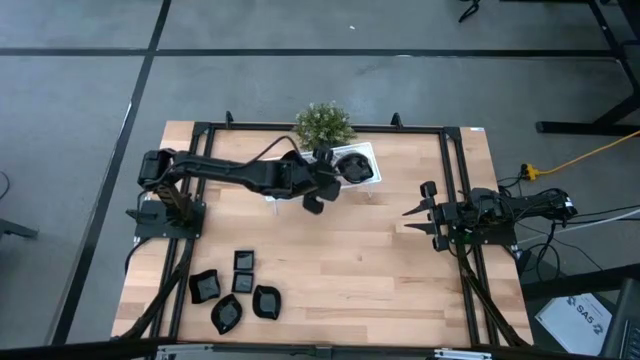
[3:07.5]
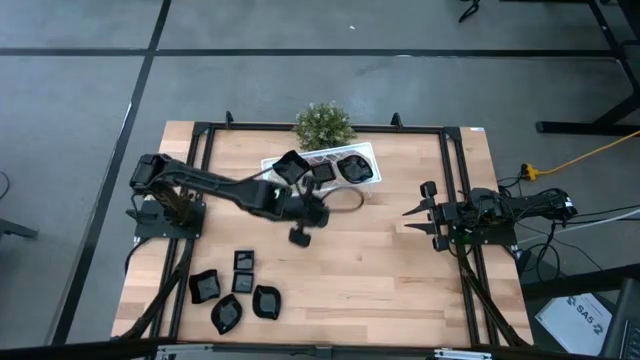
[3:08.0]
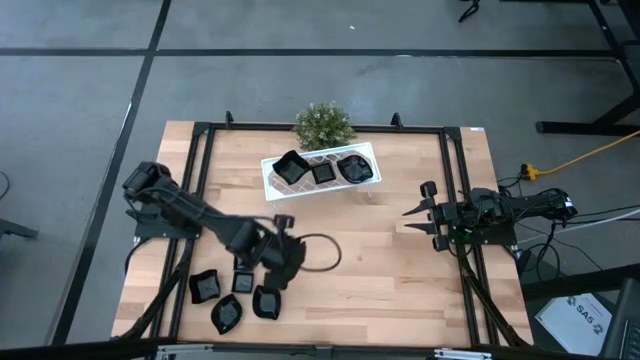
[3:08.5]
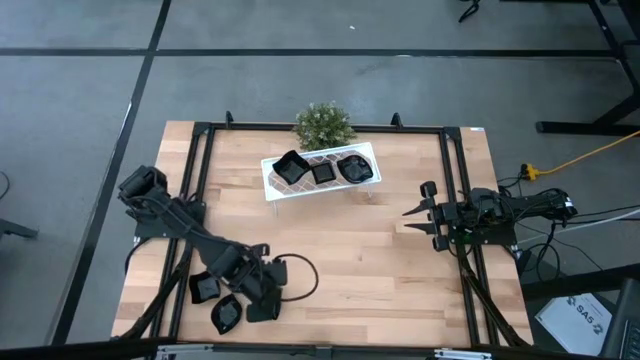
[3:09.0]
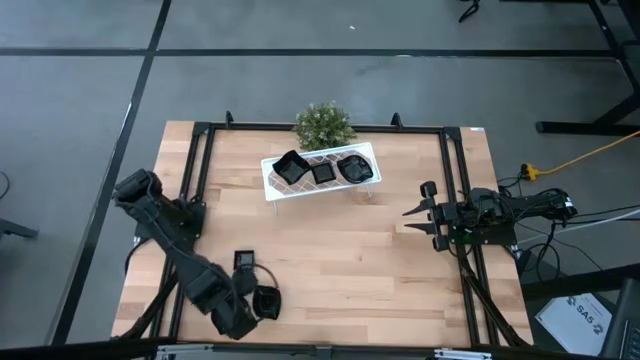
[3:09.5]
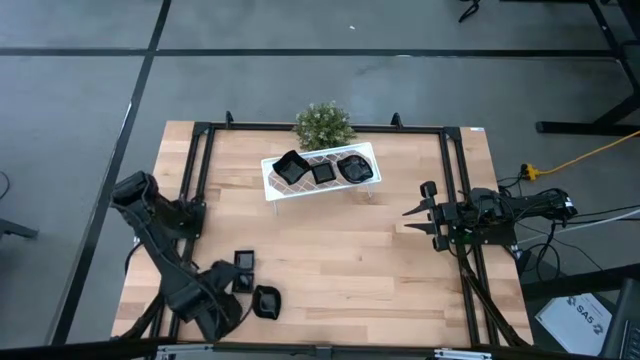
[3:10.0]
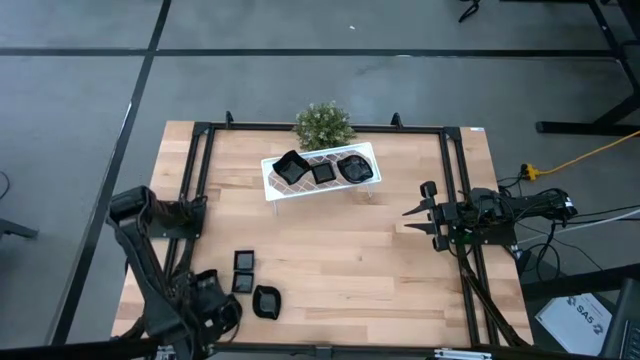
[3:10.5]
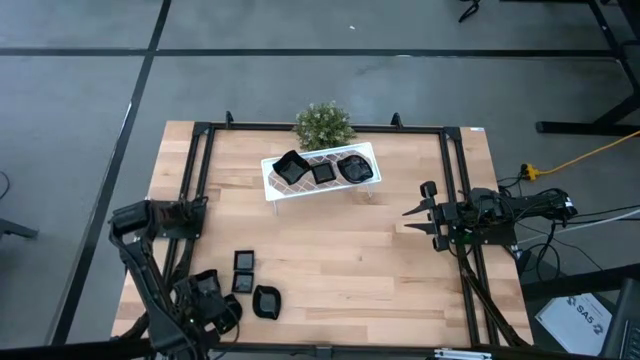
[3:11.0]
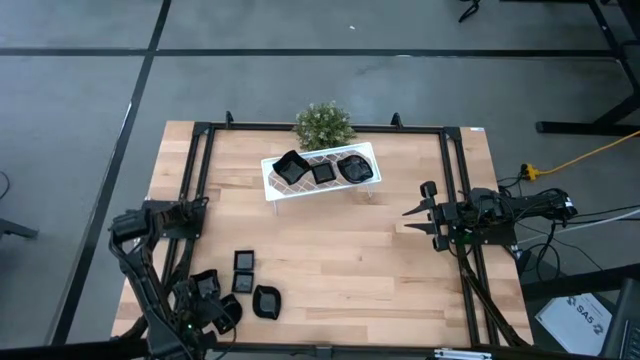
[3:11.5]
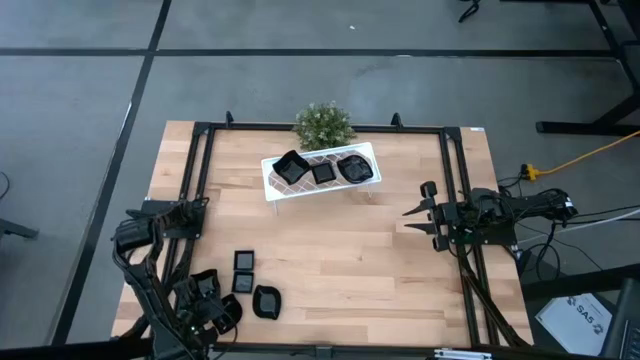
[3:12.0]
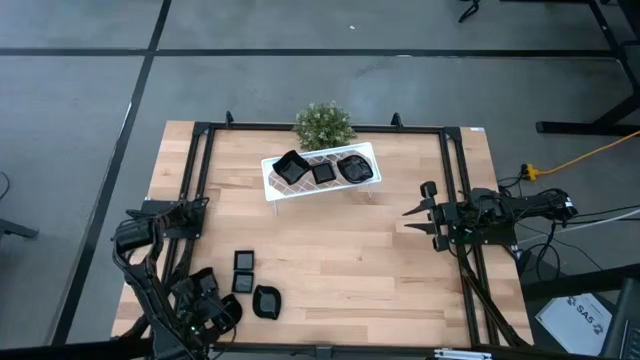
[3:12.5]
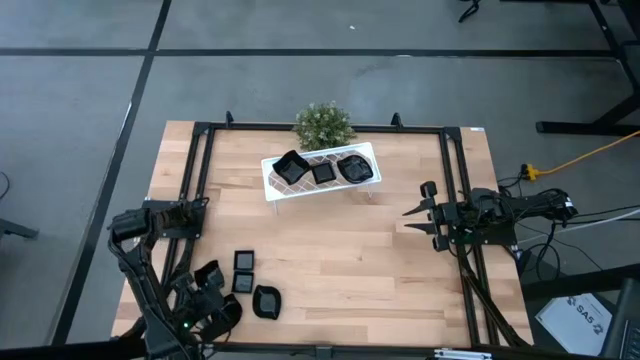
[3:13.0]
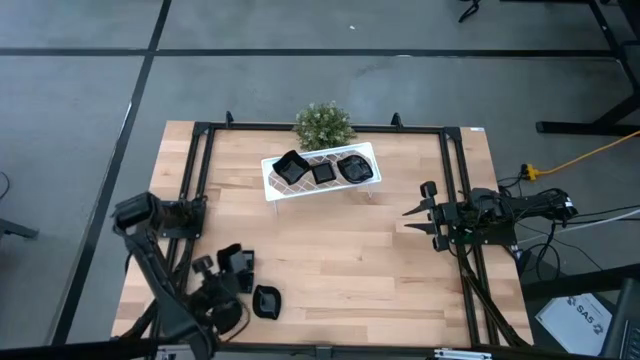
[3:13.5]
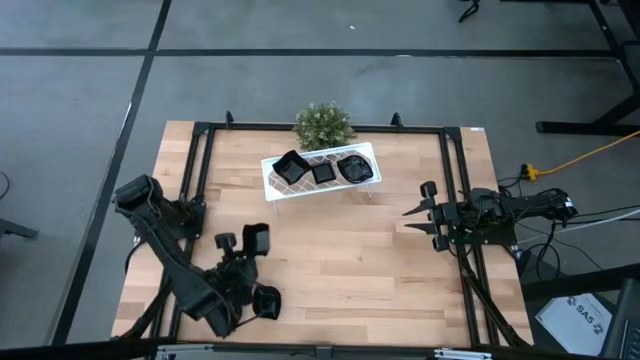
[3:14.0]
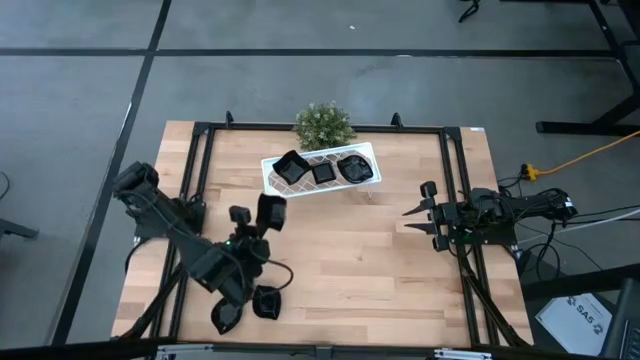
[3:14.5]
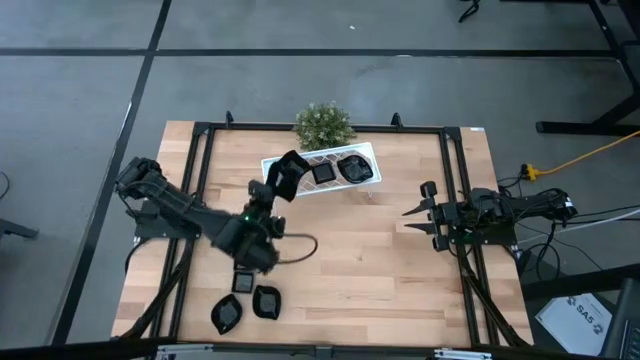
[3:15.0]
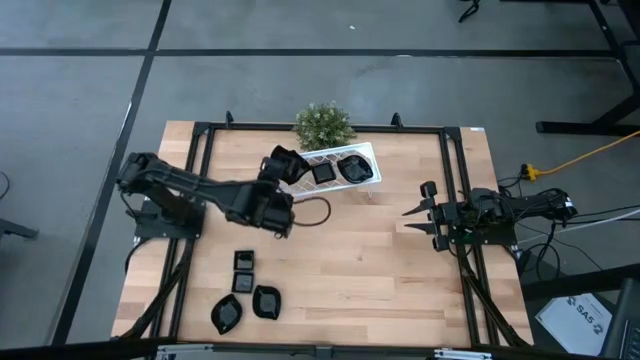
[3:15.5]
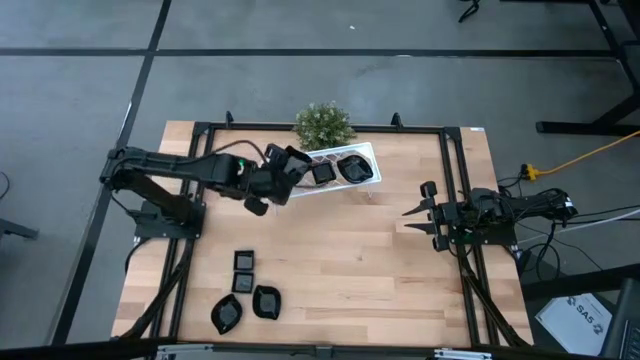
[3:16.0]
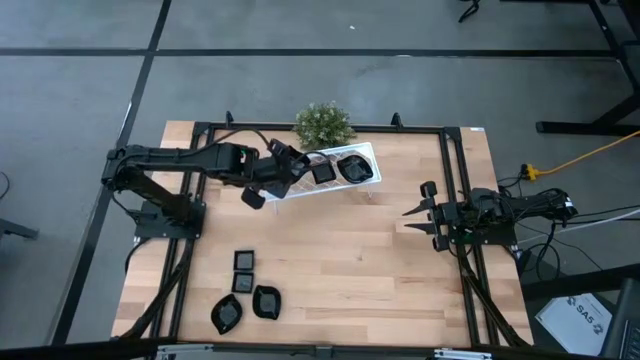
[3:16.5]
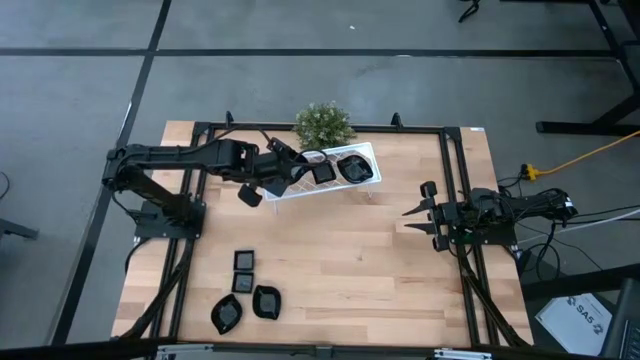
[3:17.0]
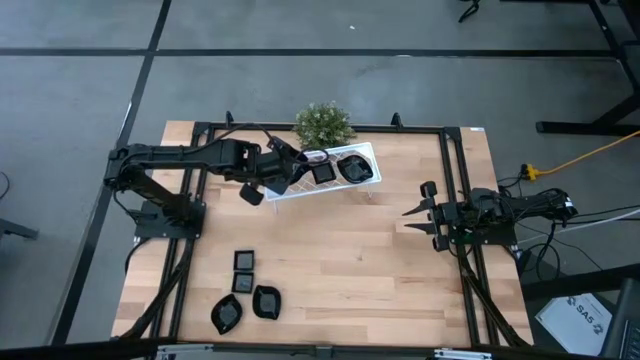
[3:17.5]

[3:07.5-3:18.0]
Task: Pick & Place Mini shaped plates
Stack the distorted square plate on top of the distorted square plate on the shelf

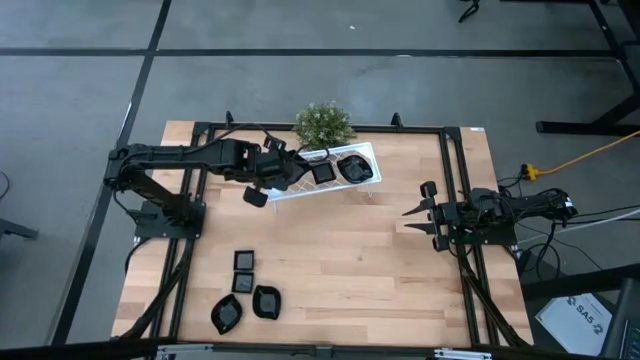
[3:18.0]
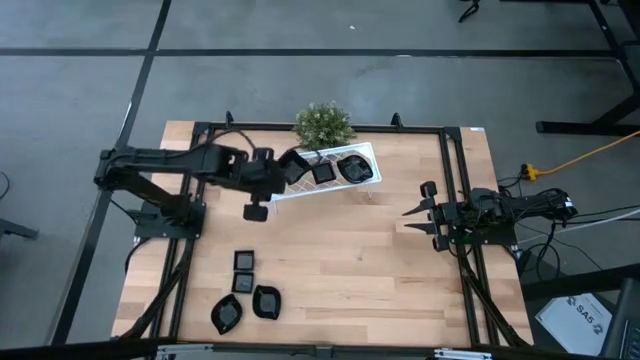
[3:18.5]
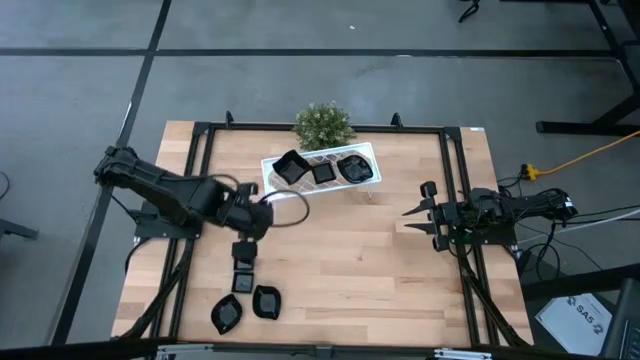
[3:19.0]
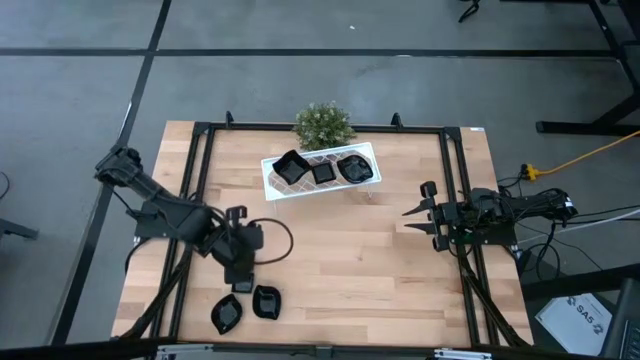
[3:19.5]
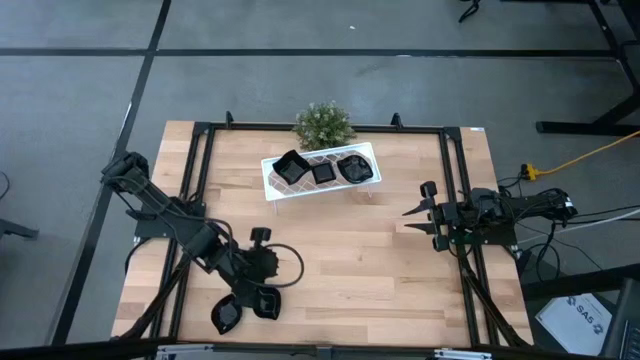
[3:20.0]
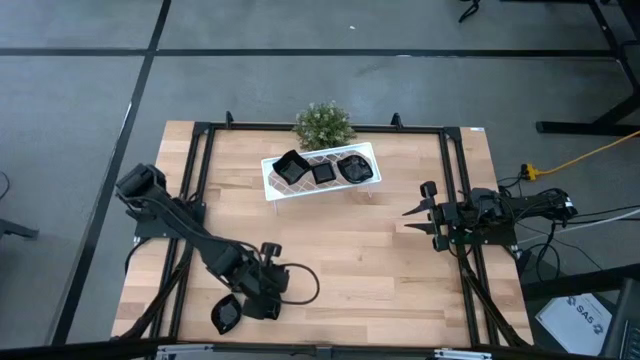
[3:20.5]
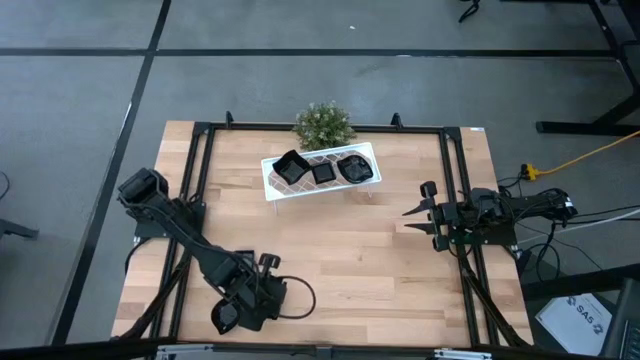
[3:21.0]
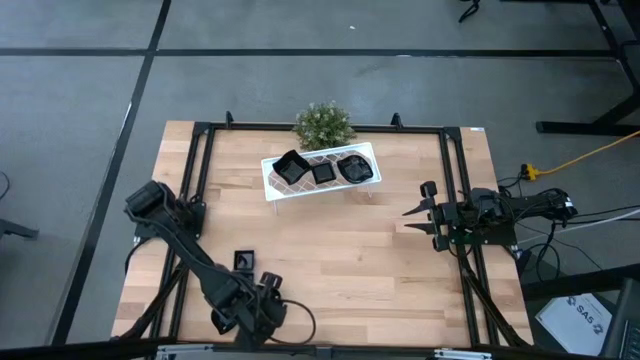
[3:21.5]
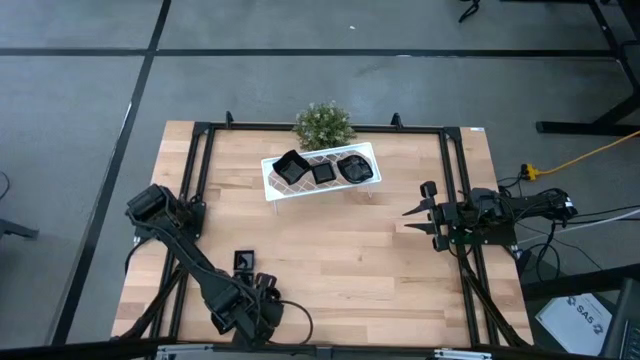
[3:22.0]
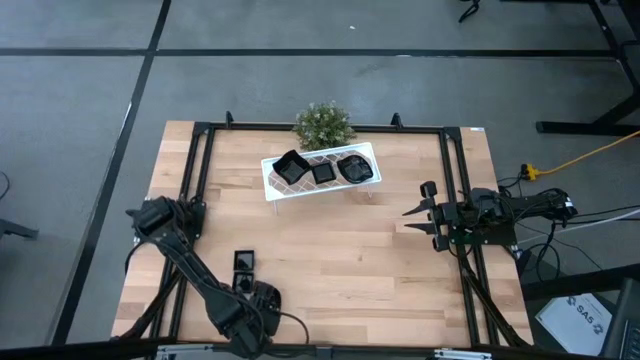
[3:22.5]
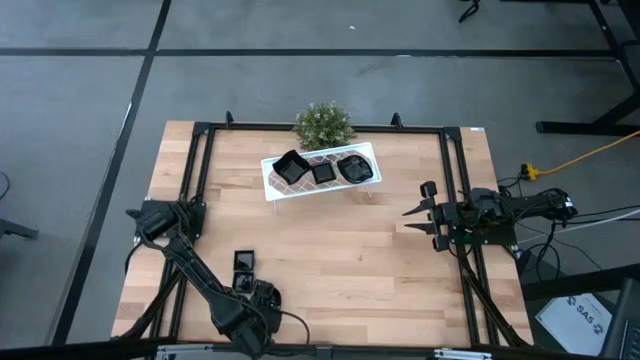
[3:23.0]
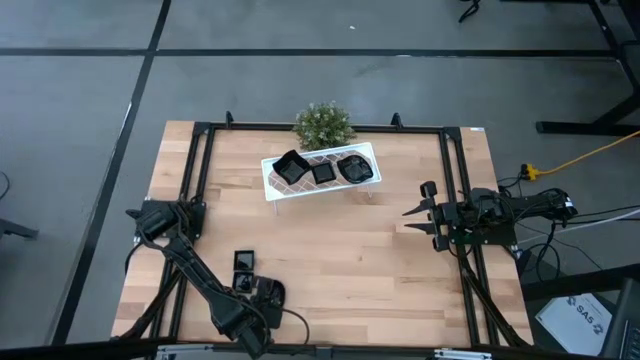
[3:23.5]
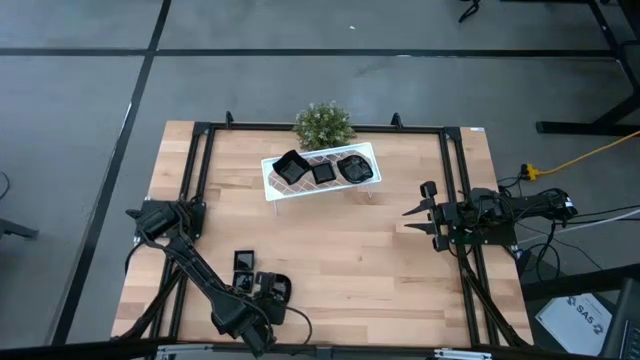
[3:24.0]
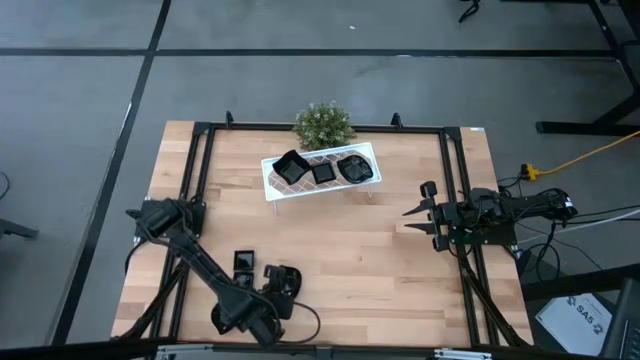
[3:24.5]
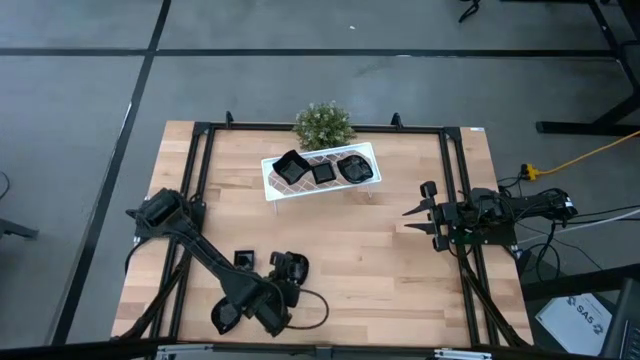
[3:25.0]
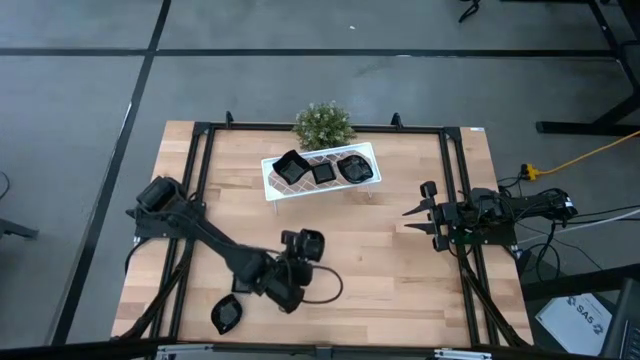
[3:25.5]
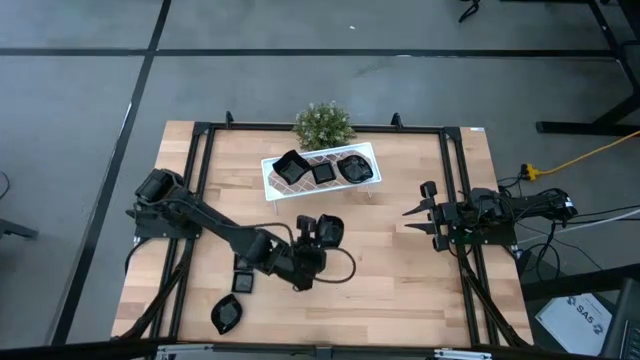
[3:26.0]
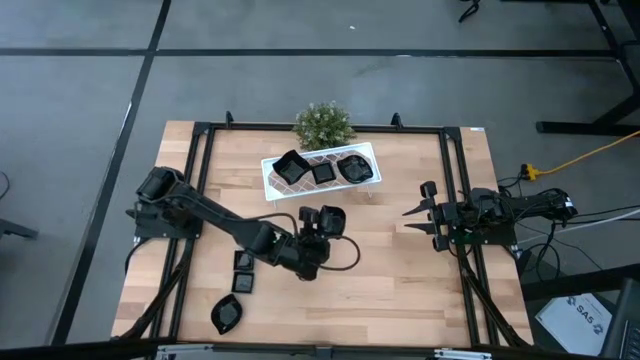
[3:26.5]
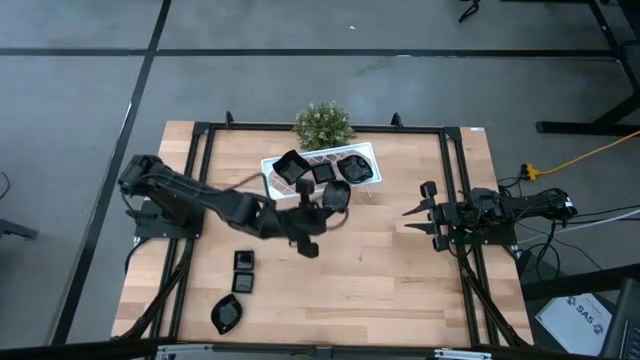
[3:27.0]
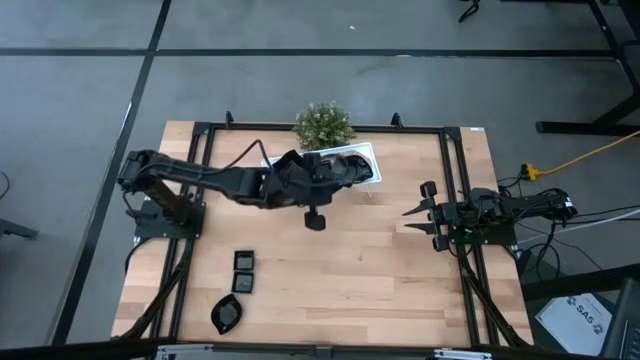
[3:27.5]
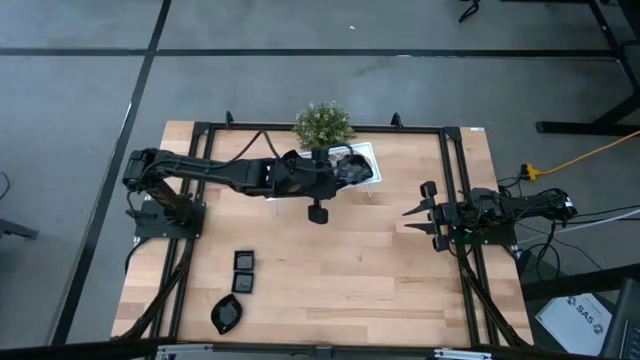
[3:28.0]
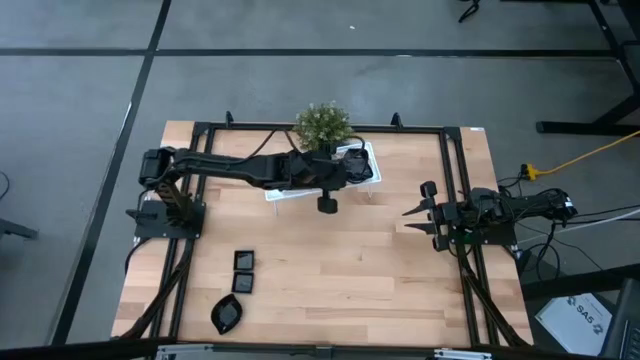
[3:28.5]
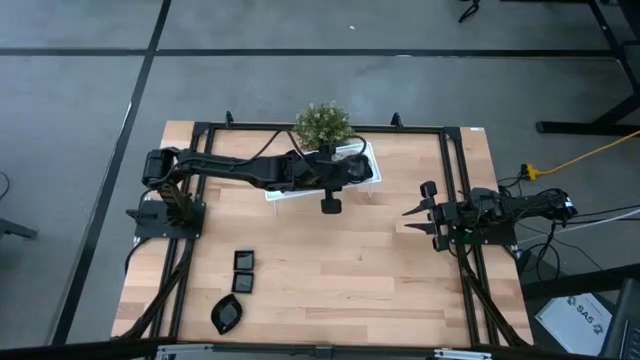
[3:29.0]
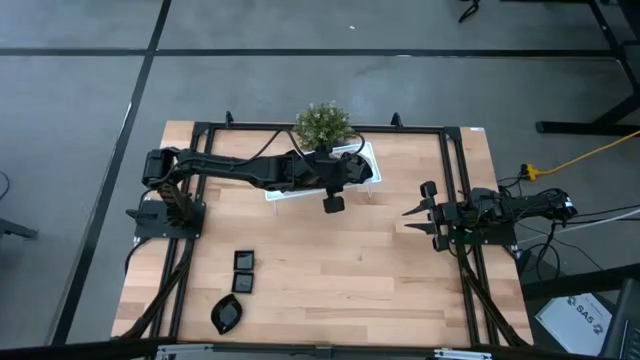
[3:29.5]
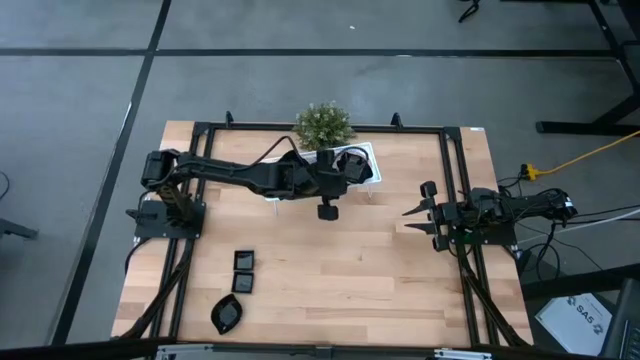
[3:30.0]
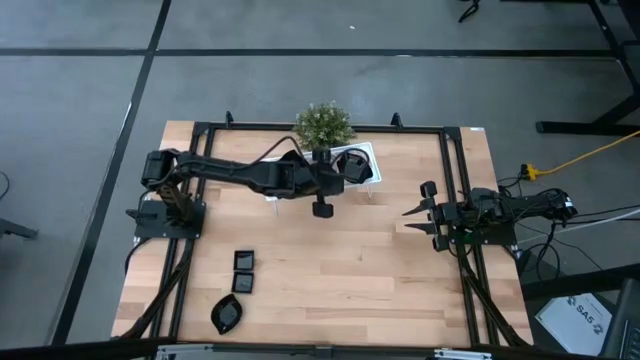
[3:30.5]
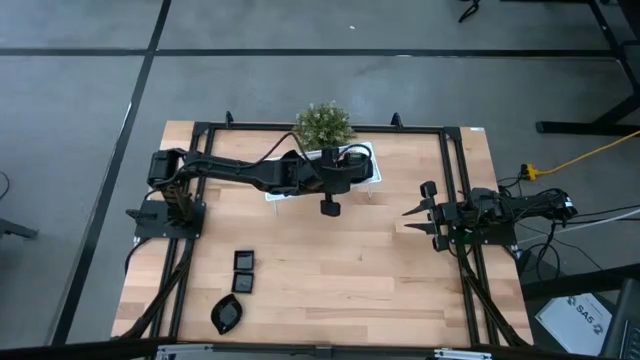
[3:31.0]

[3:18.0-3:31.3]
Stack the leaf shaped plate on top of the leaf shaped plate on the shelf
